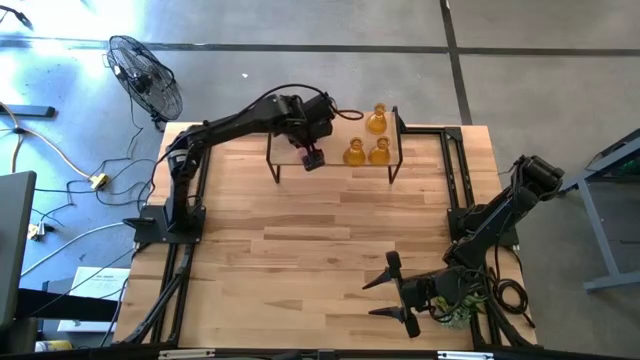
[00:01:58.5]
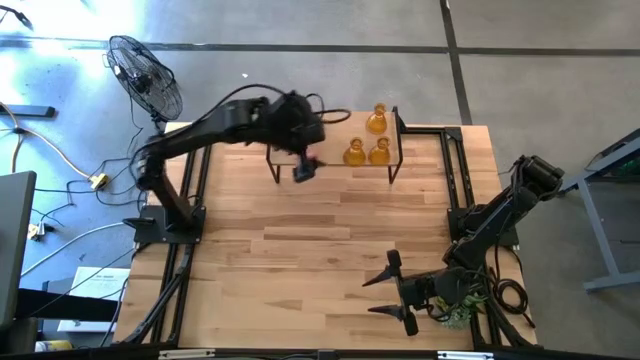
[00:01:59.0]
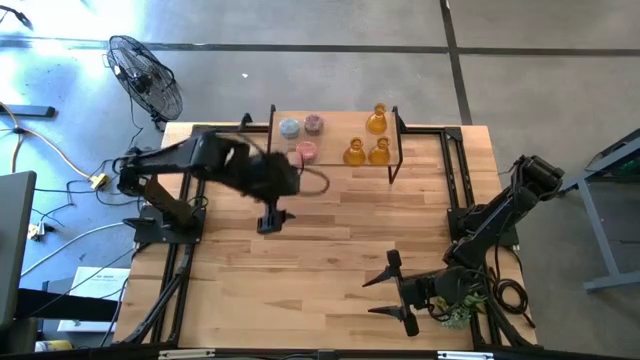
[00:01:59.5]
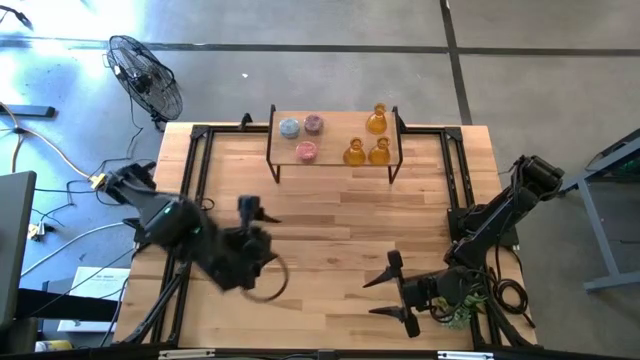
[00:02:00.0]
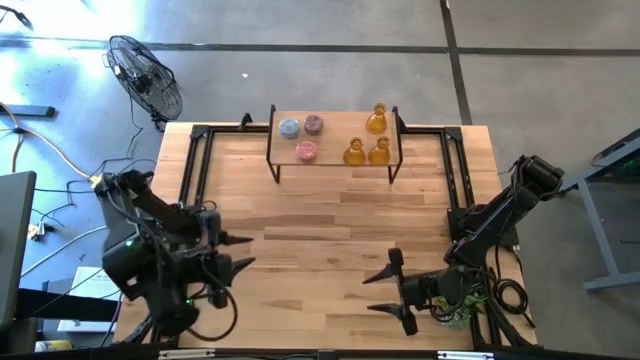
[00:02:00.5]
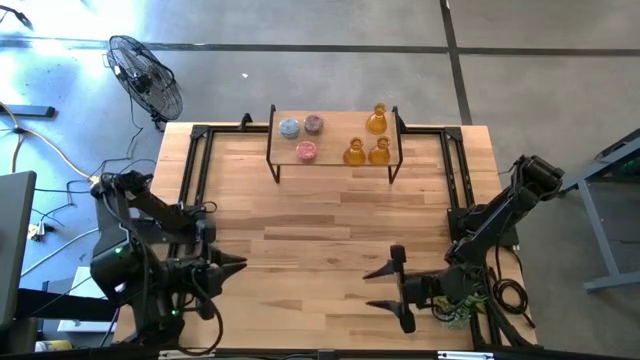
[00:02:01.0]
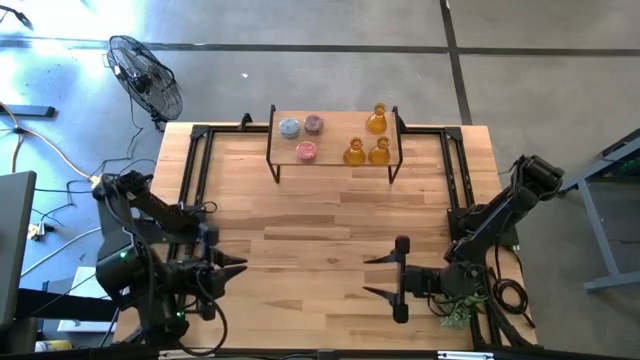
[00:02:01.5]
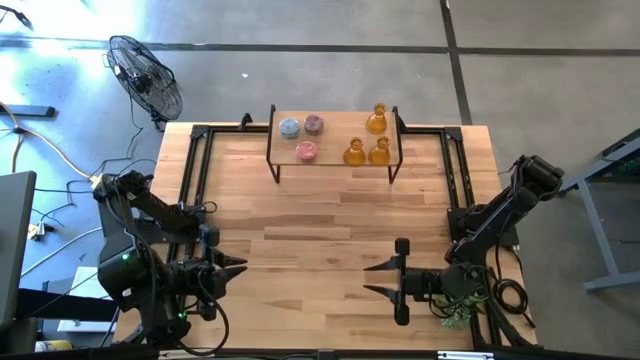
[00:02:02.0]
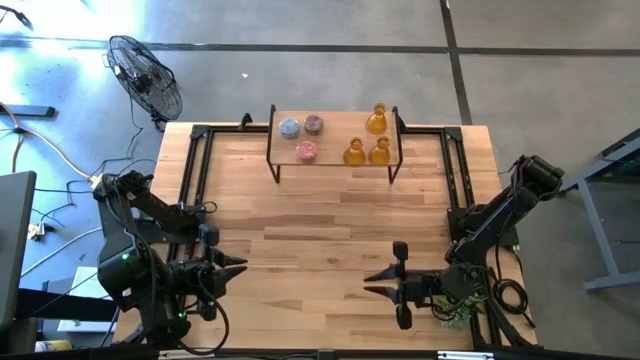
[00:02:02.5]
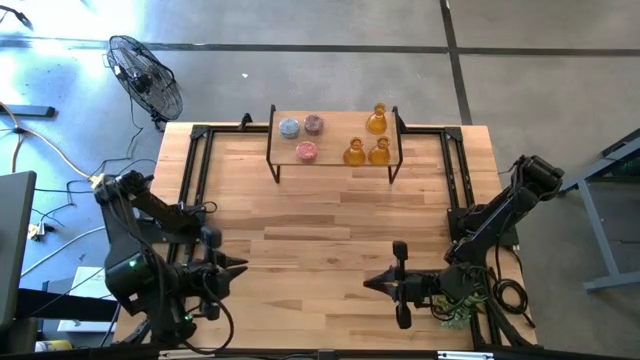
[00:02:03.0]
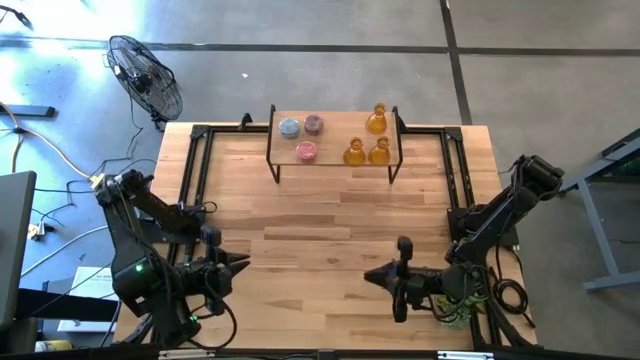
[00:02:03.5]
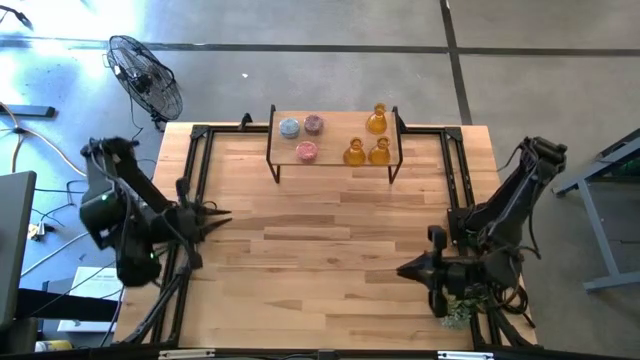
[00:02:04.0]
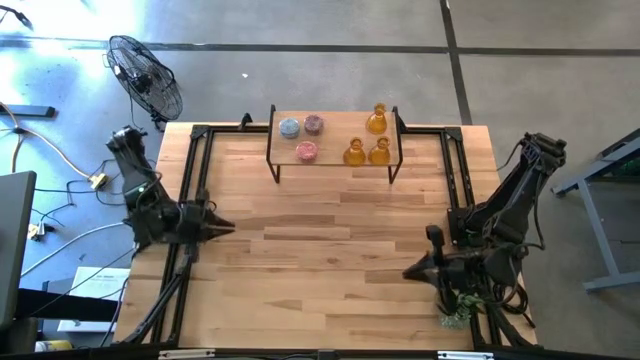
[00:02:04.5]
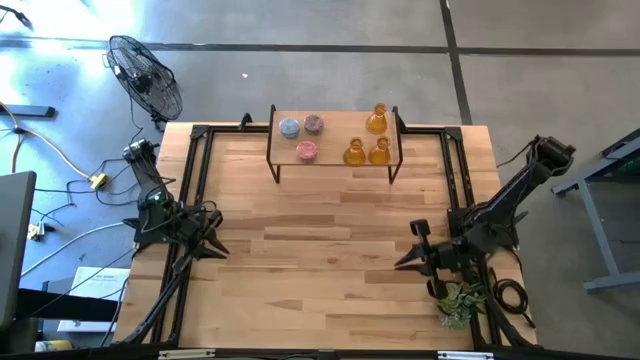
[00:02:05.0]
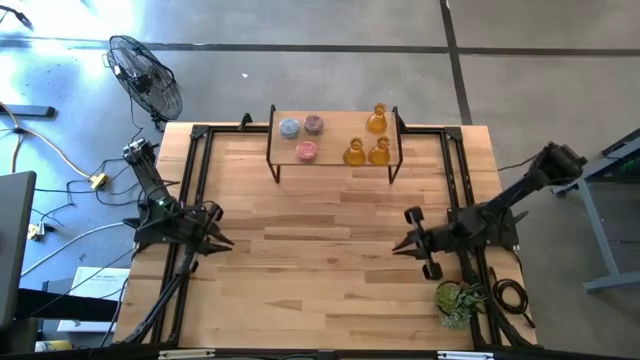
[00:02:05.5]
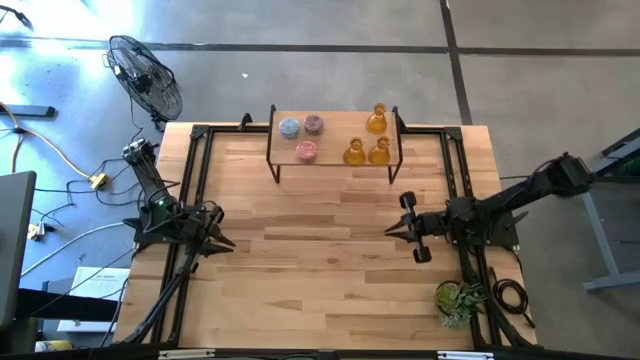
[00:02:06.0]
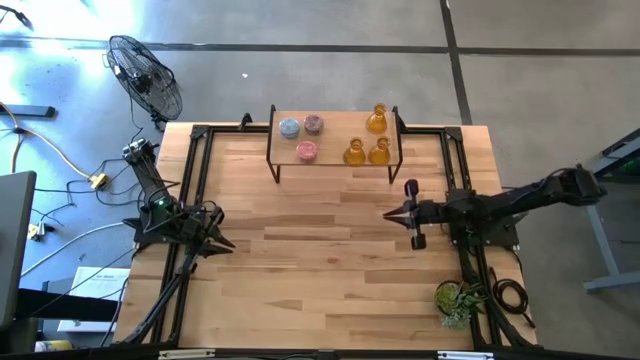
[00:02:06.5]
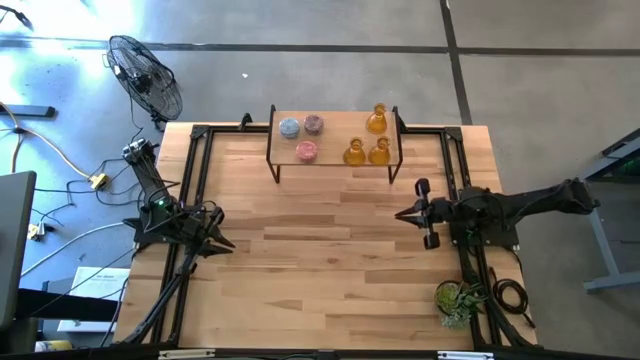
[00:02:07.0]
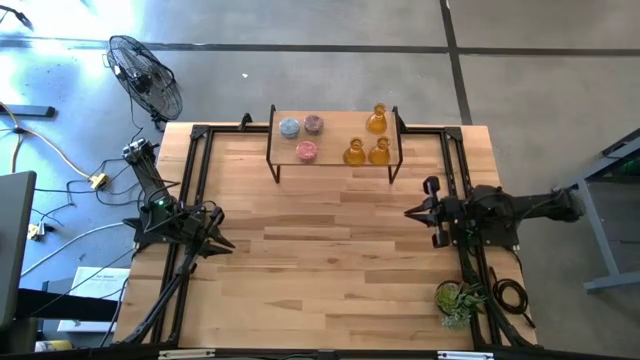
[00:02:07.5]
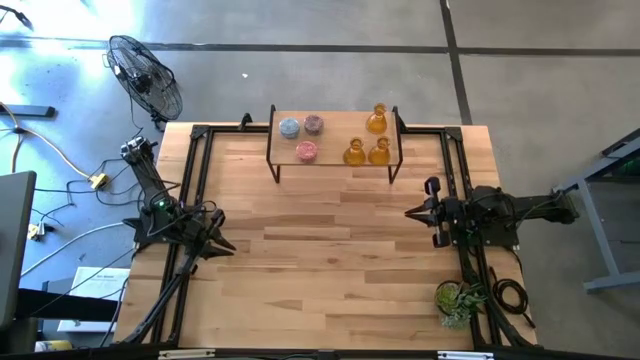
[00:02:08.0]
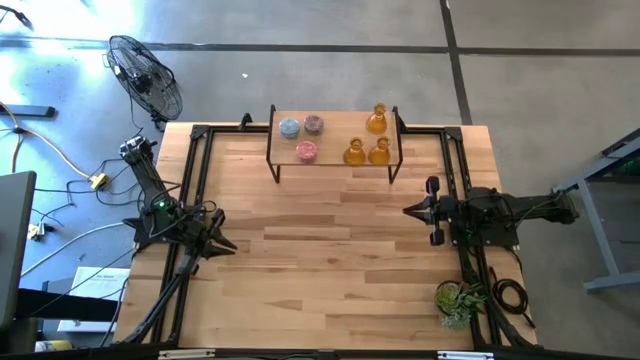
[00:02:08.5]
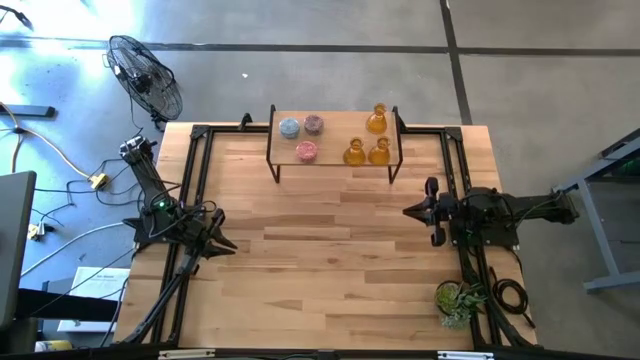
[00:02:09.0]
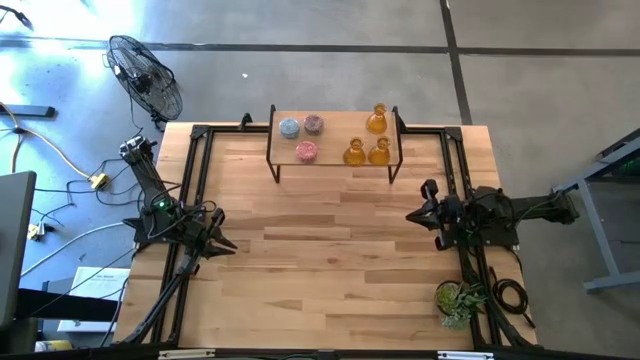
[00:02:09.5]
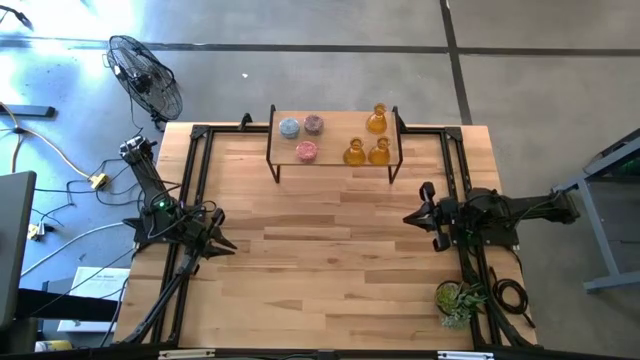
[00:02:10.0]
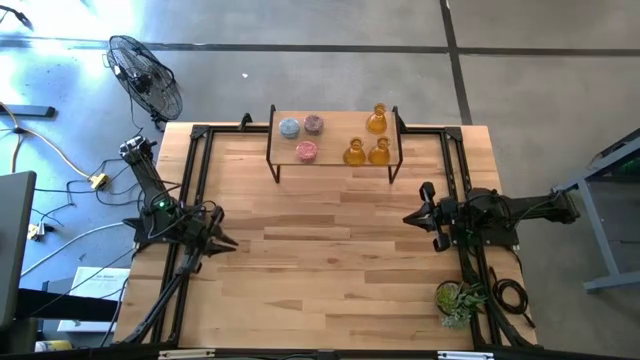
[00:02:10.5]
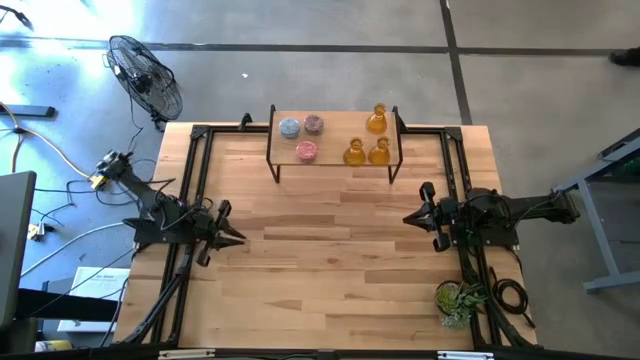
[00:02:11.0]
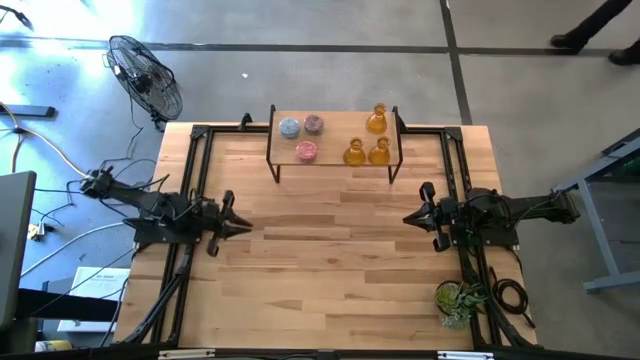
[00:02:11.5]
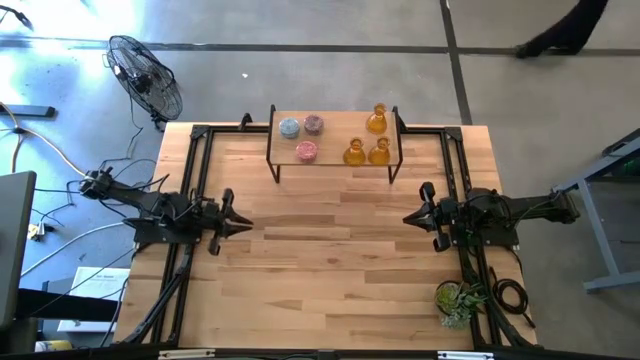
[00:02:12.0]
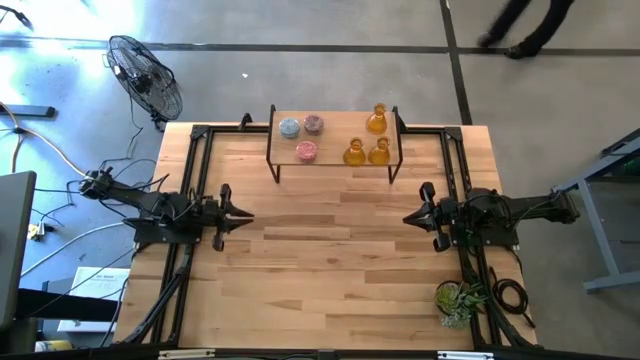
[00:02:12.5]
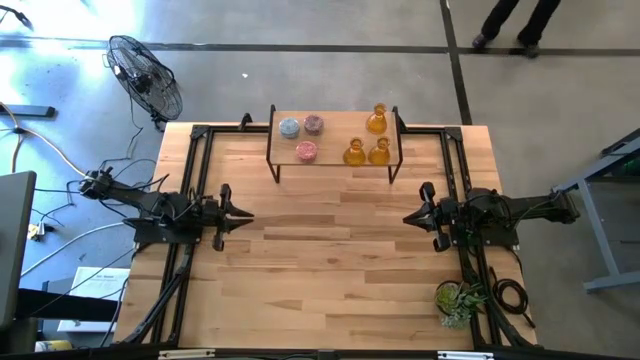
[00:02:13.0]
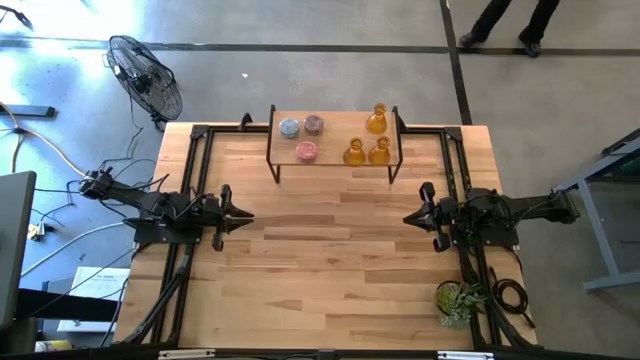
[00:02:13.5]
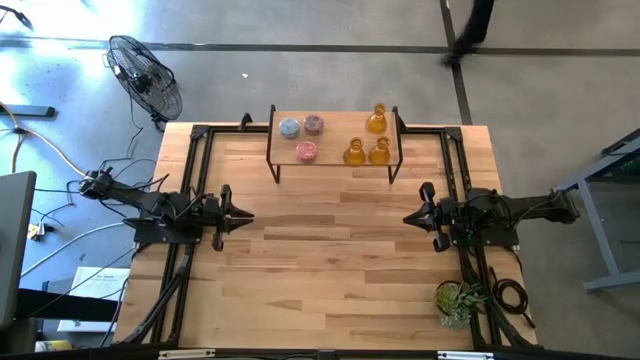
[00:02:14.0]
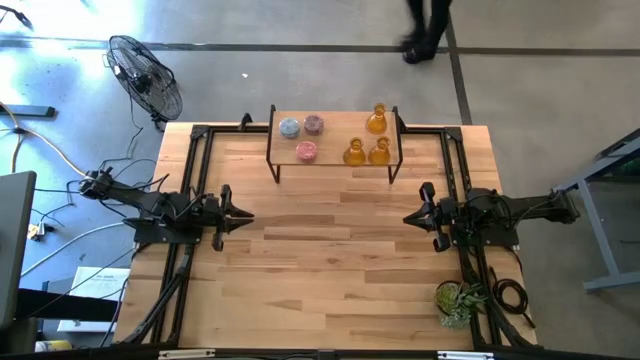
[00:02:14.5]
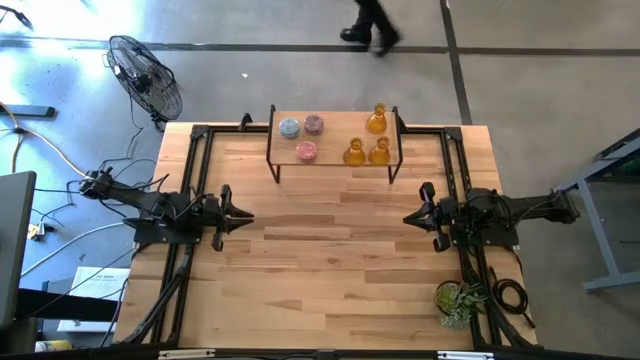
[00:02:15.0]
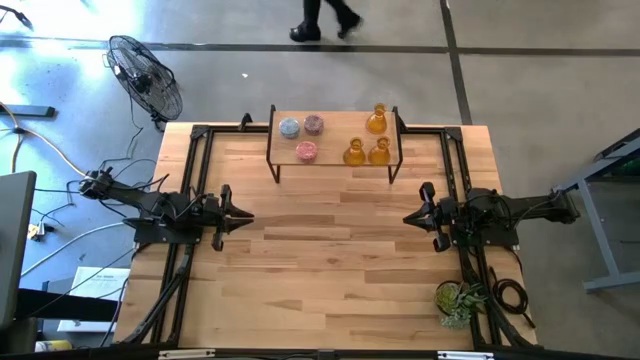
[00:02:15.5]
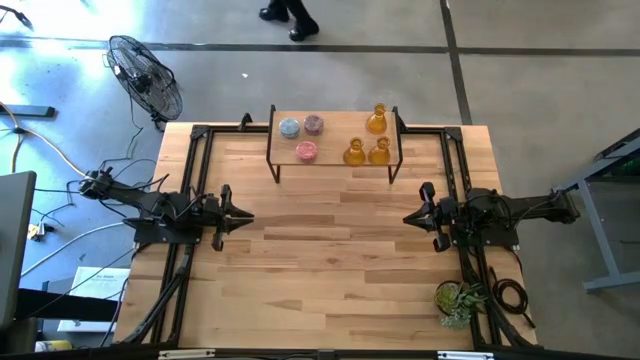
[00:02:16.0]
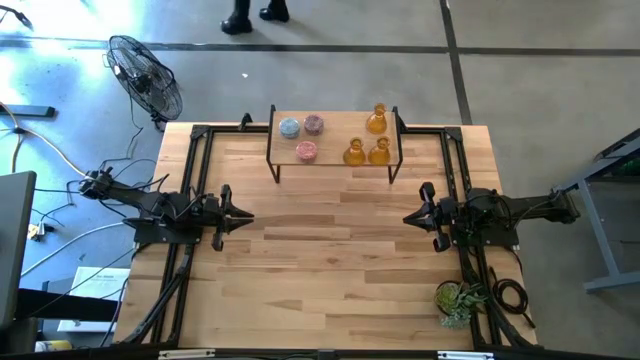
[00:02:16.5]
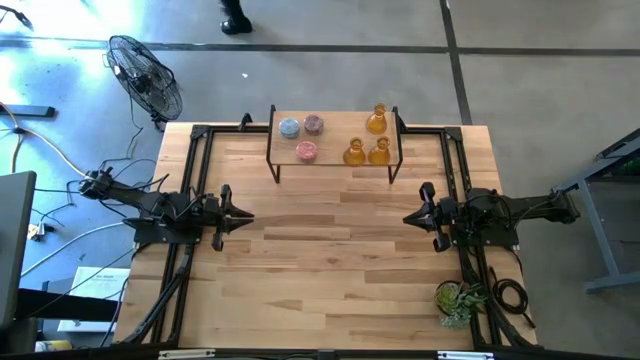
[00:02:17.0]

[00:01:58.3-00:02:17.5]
Task: Pick & Place candle stick holders
Return to Home Position
